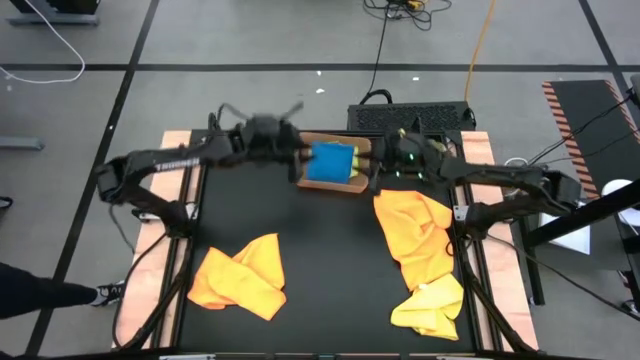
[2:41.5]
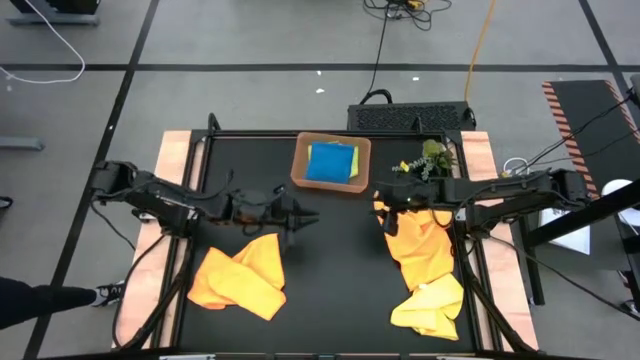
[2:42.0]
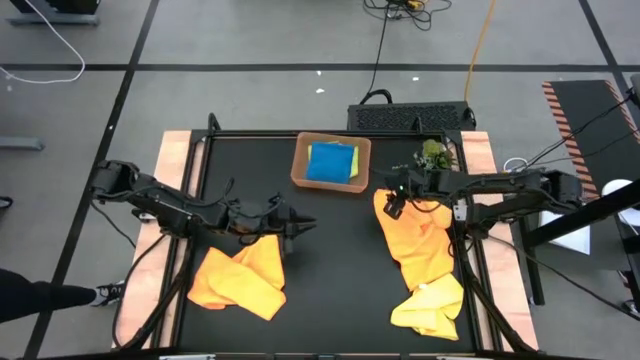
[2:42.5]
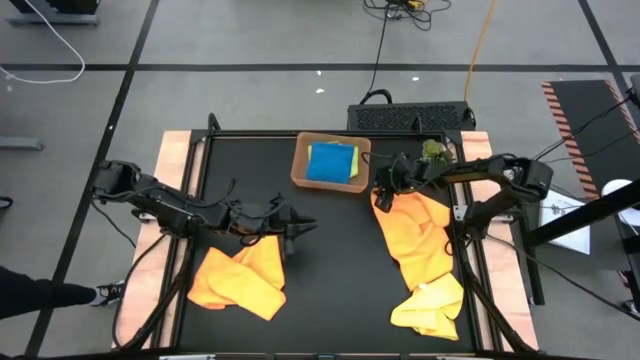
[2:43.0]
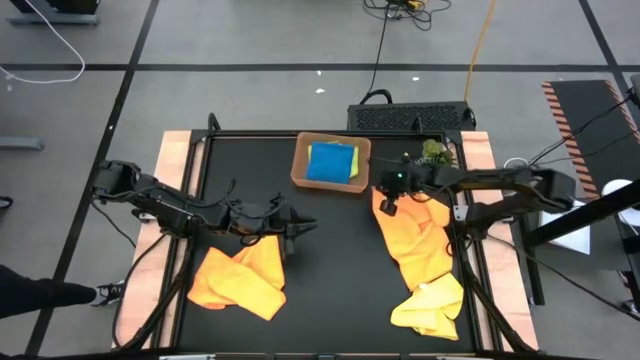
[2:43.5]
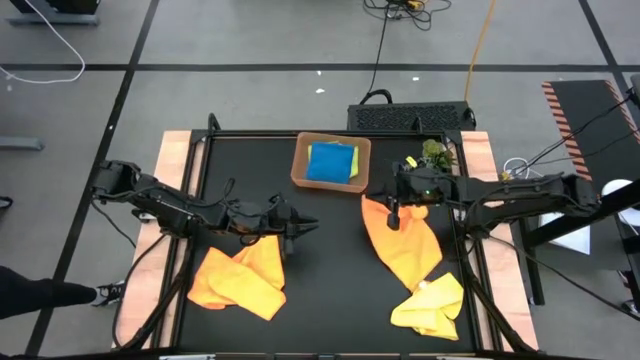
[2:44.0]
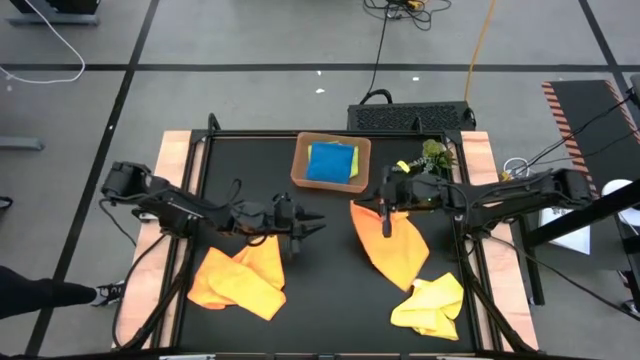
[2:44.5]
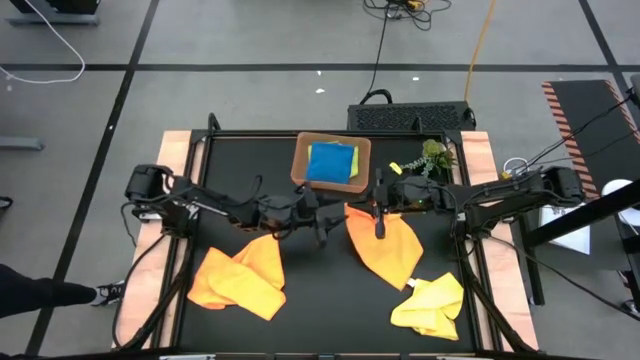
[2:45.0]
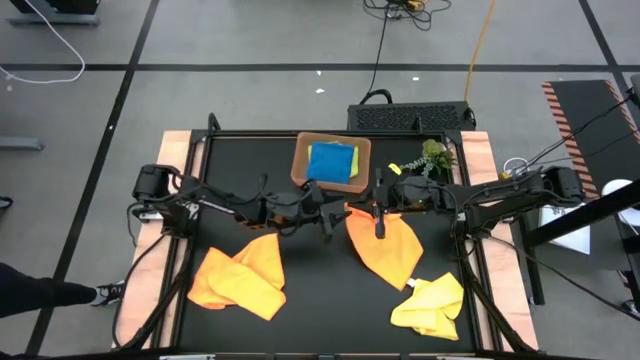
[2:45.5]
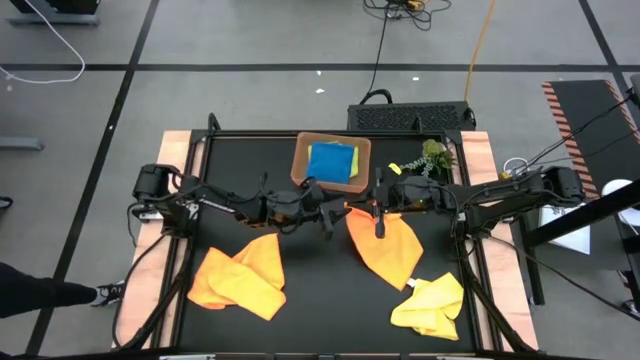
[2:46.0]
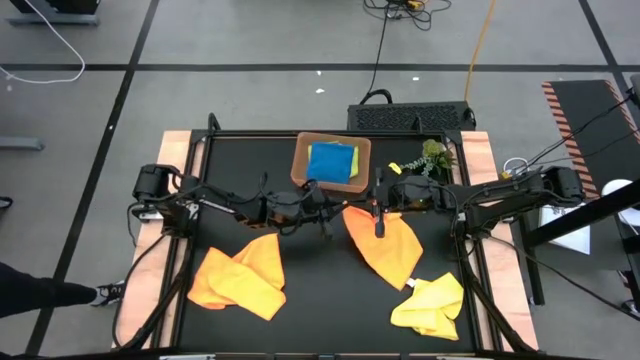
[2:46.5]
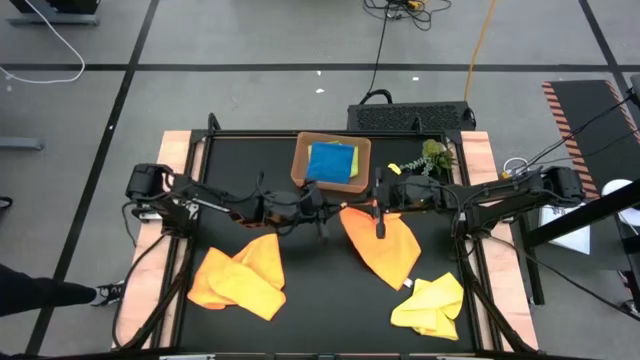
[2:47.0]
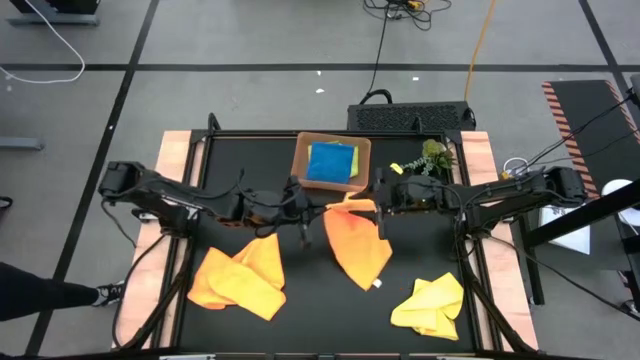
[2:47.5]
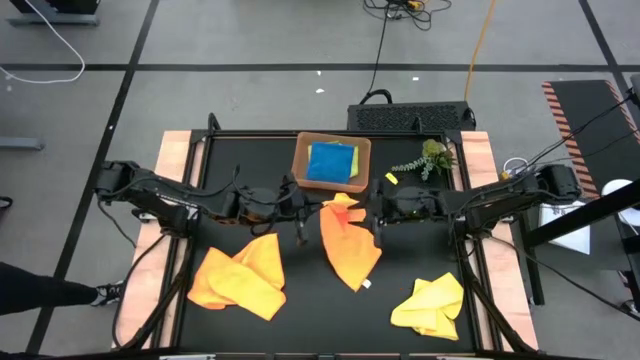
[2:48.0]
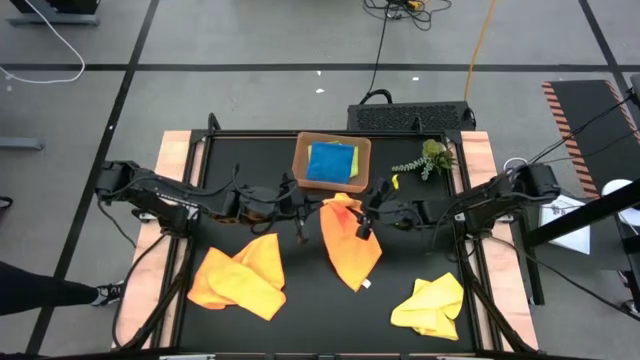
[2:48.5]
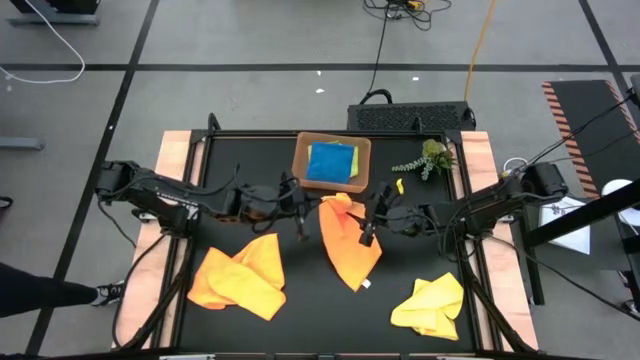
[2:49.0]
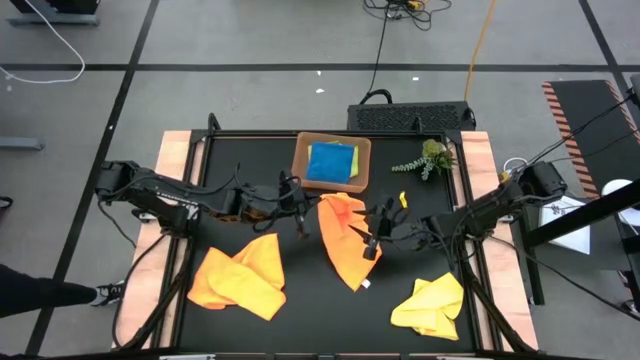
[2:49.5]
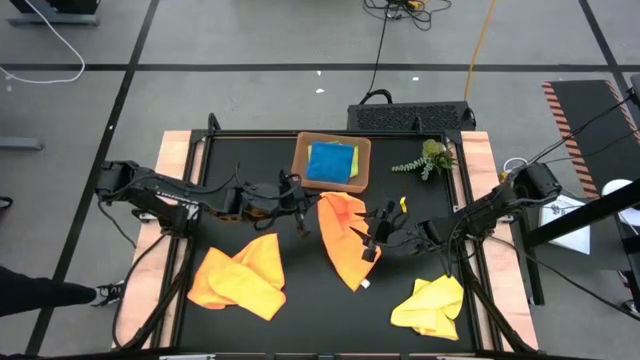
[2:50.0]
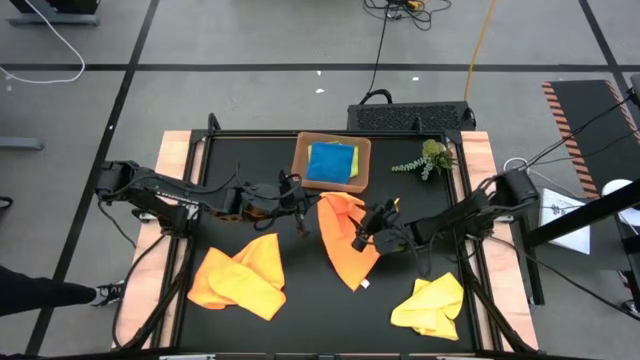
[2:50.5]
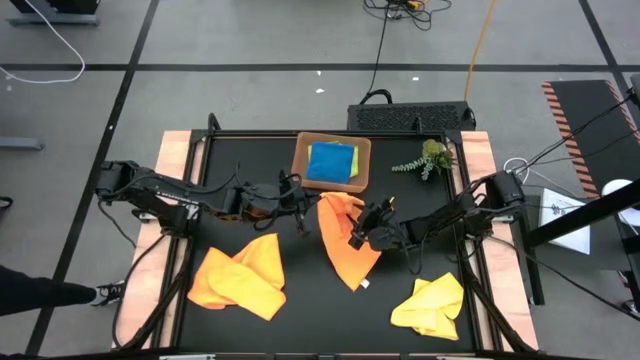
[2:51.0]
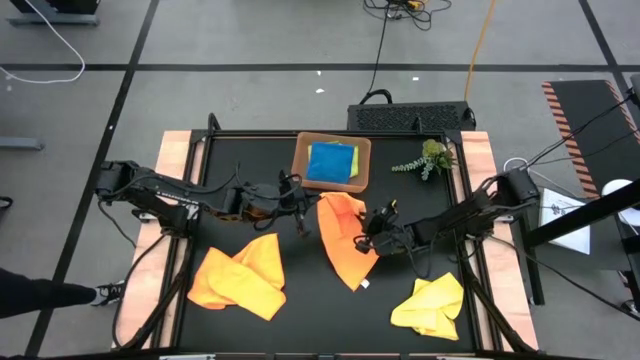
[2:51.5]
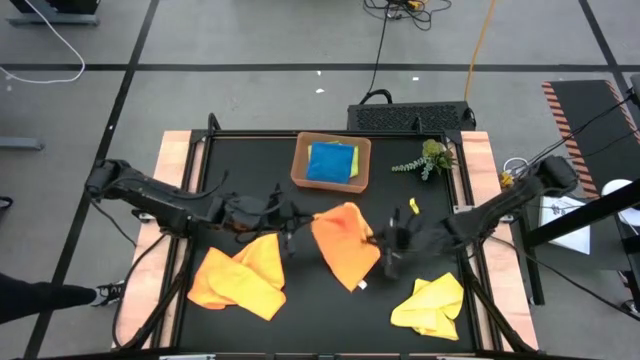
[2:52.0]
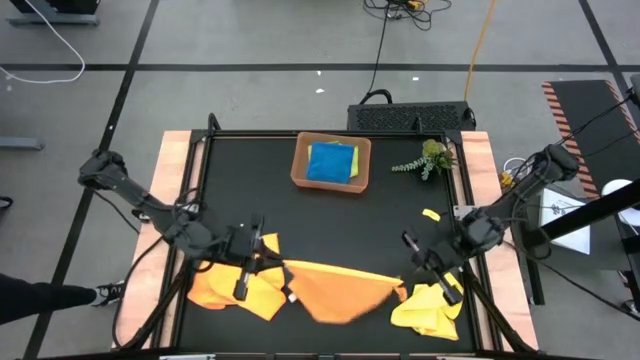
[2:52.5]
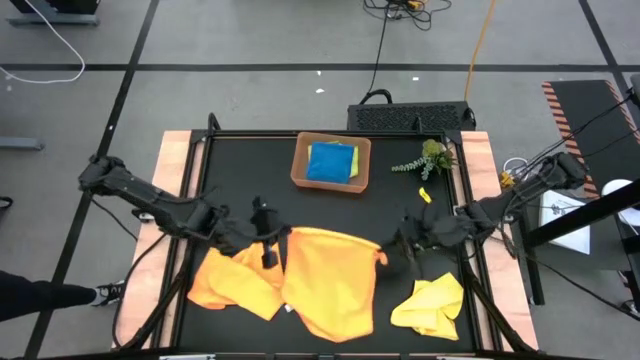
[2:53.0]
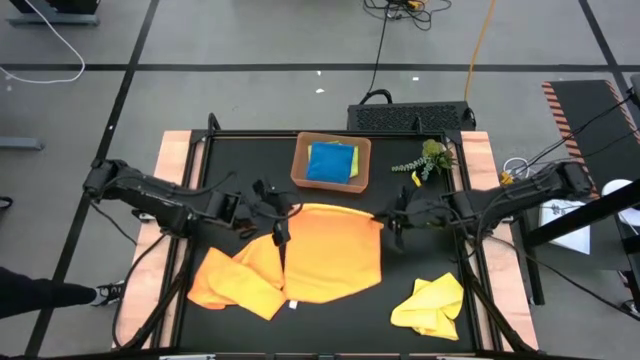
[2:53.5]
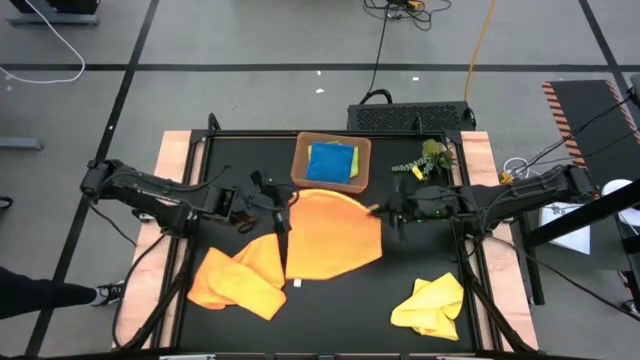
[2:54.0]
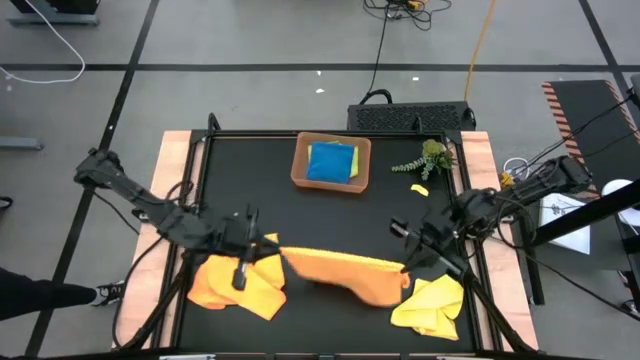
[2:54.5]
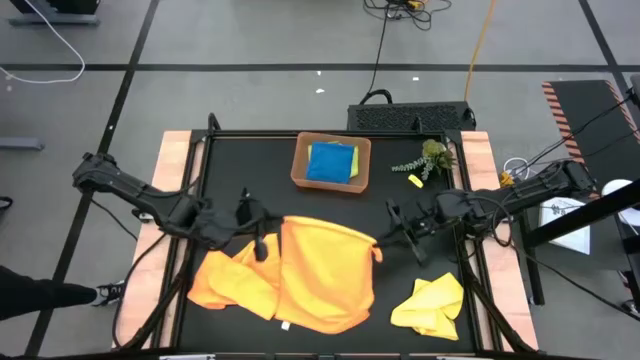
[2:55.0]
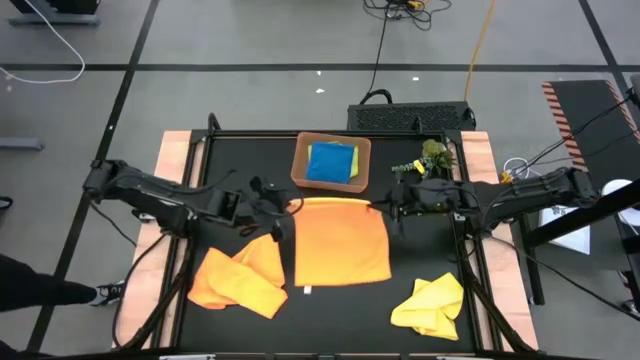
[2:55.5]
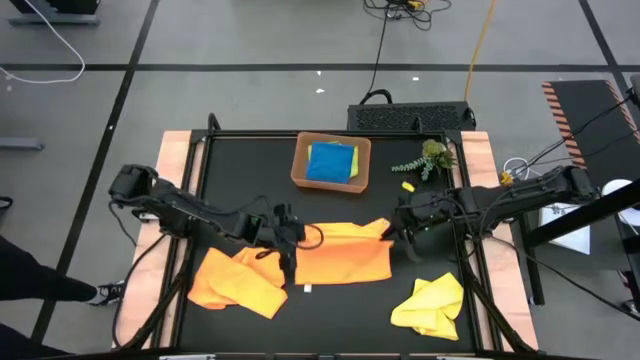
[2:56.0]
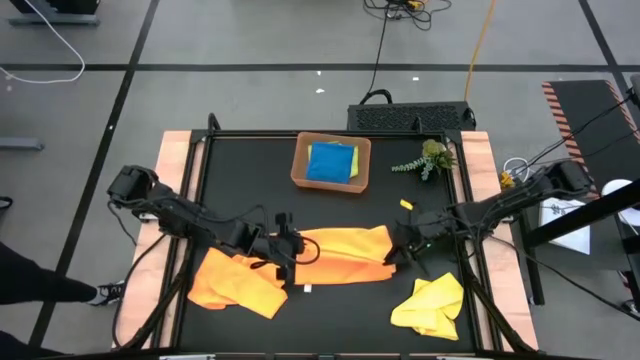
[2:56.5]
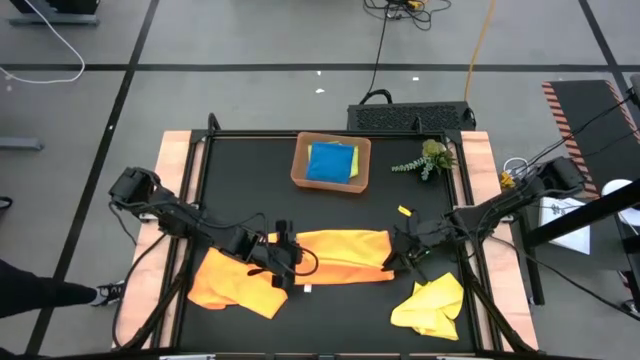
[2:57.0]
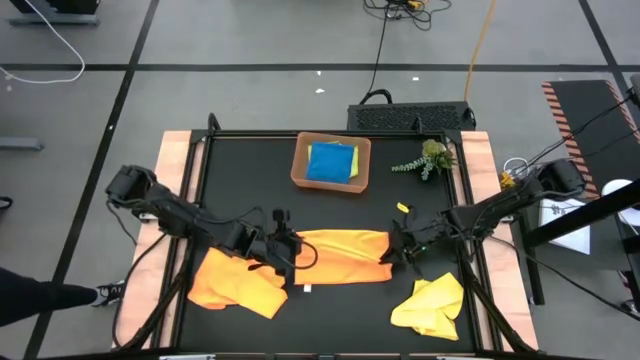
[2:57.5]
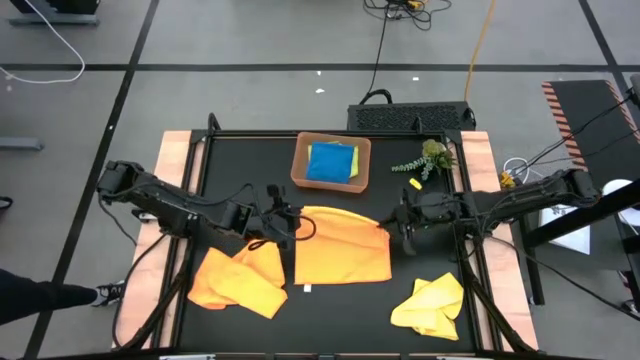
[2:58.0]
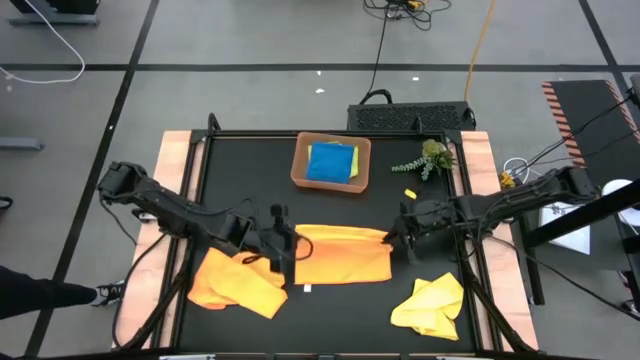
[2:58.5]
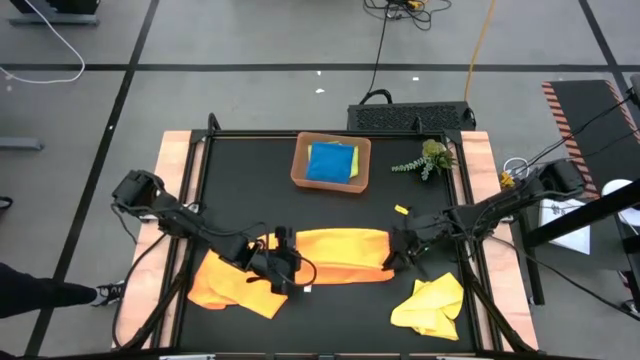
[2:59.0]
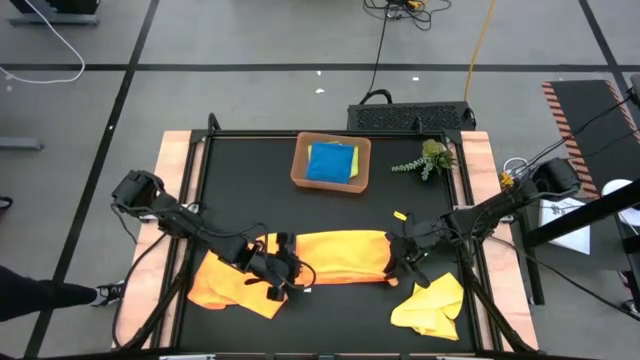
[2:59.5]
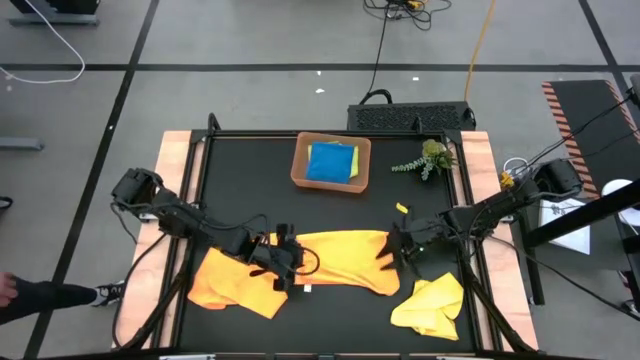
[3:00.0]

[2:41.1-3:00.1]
Task: Fold microfiber towels
Fold the orange microfiber towel

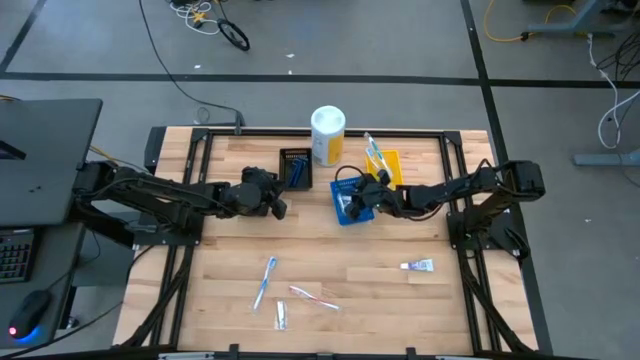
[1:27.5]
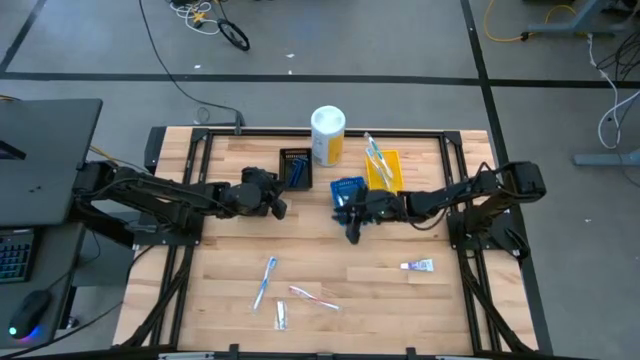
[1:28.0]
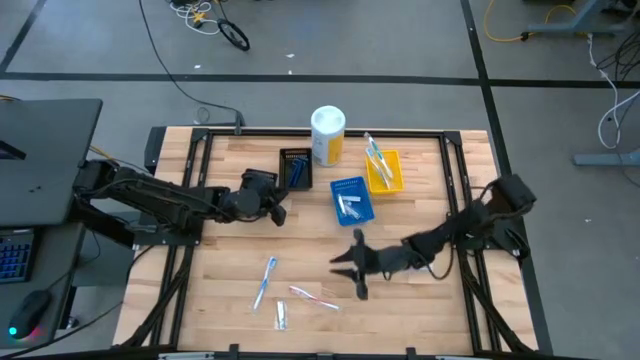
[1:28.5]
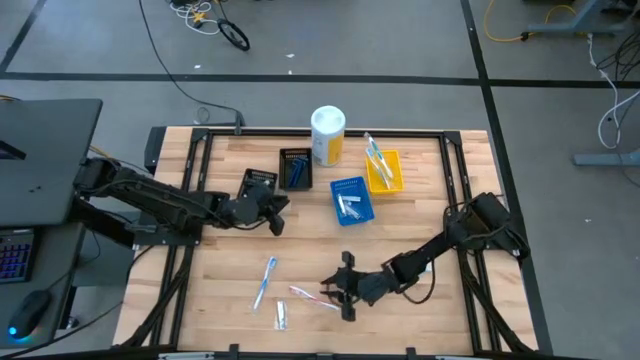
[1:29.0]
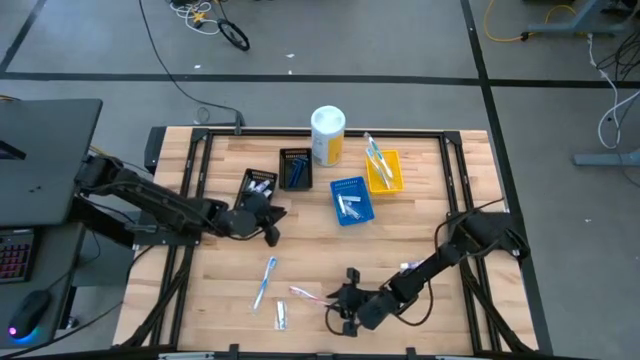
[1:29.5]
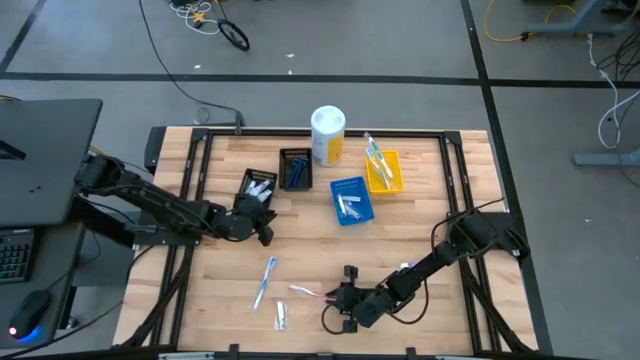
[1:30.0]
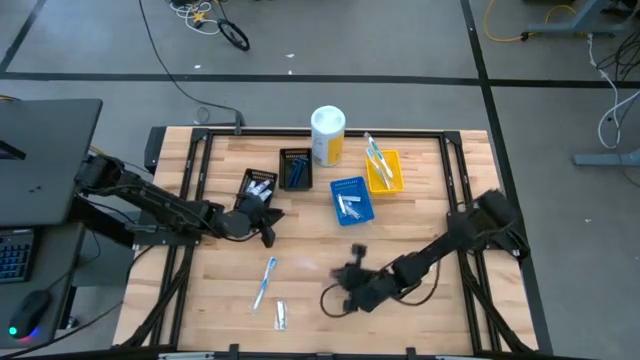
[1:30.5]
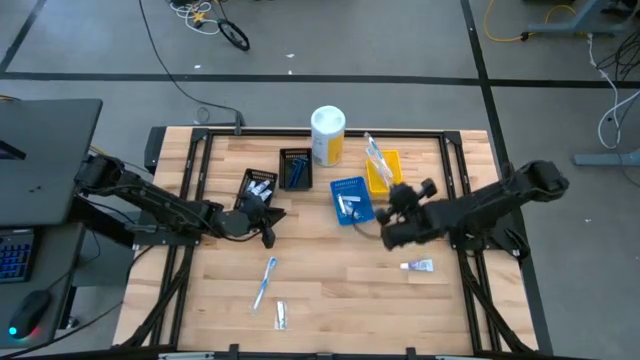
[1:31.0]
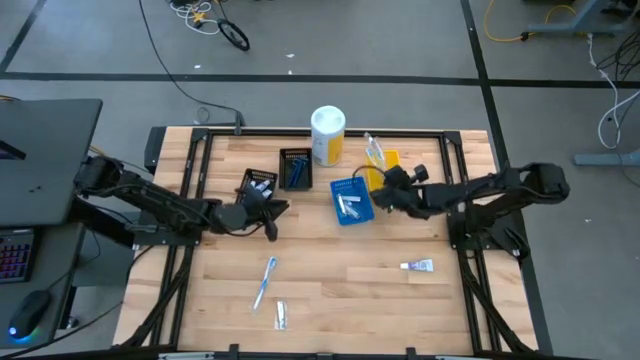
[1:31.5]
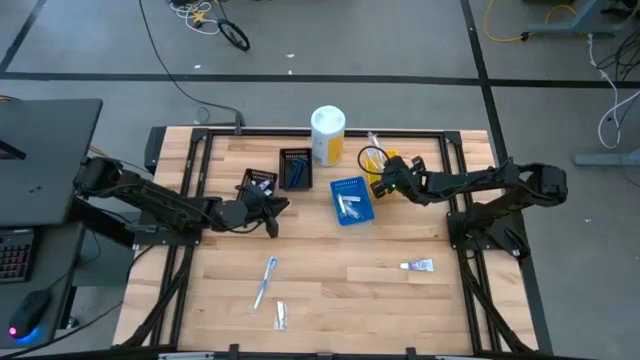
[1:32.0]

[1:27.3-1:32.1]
Task: Pick & Place Travel size toiletries
Put the orange toothbrush into the yellow bin
